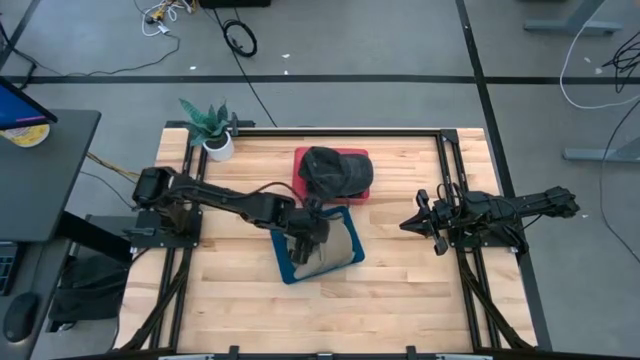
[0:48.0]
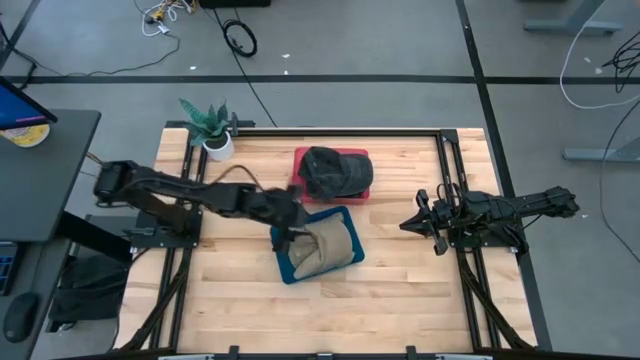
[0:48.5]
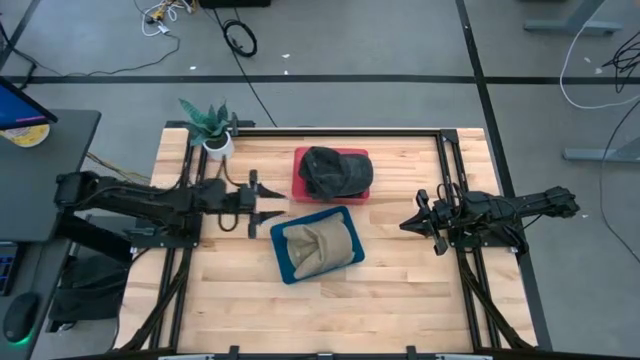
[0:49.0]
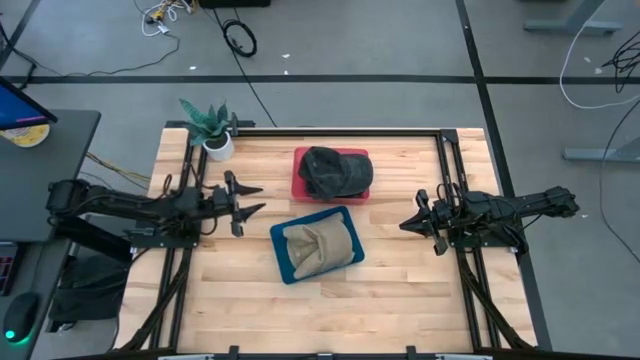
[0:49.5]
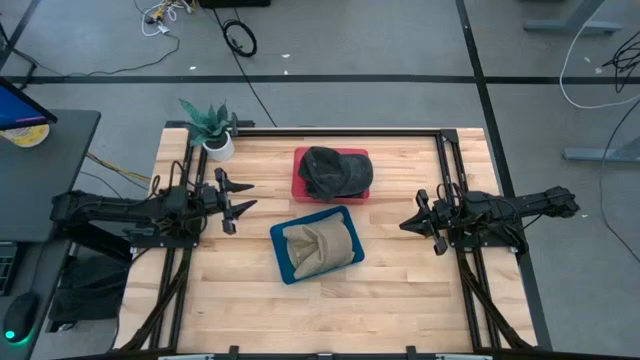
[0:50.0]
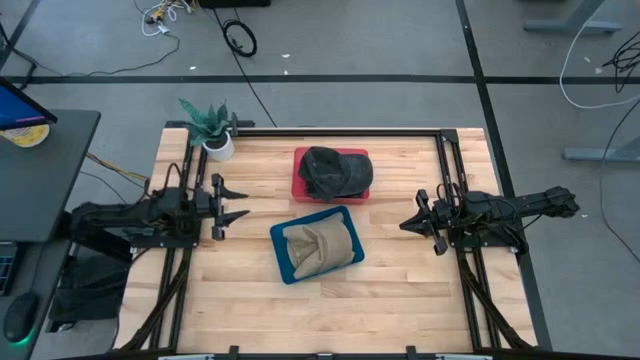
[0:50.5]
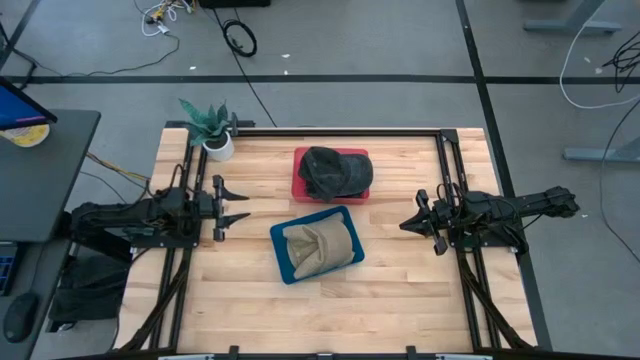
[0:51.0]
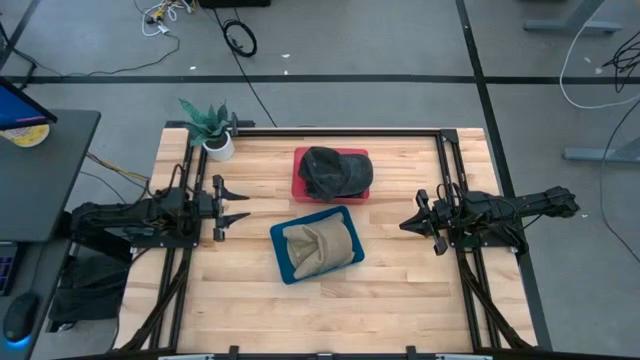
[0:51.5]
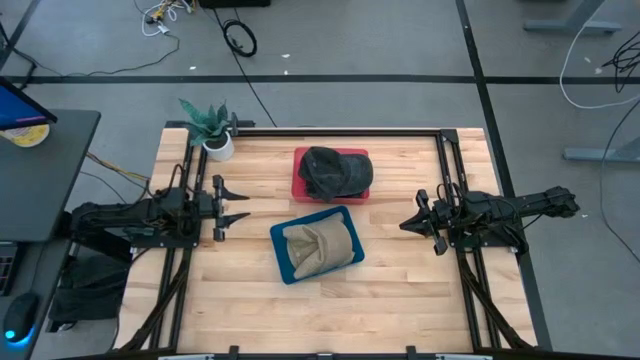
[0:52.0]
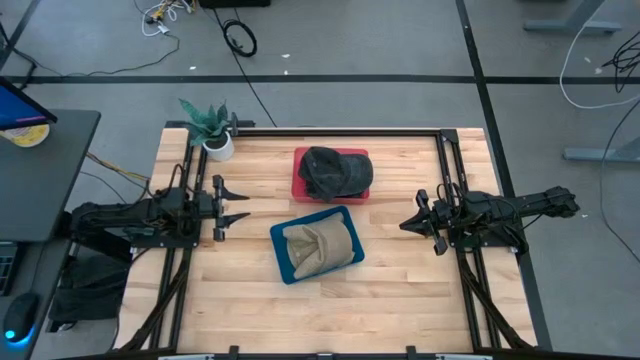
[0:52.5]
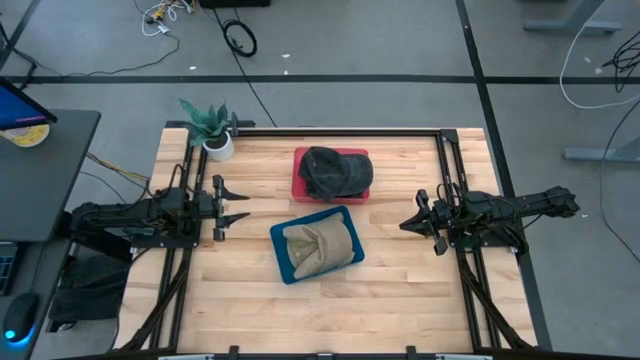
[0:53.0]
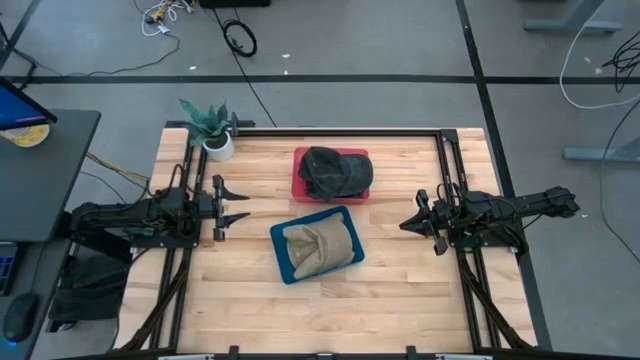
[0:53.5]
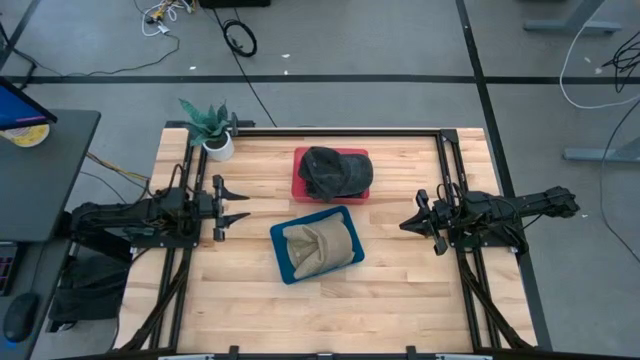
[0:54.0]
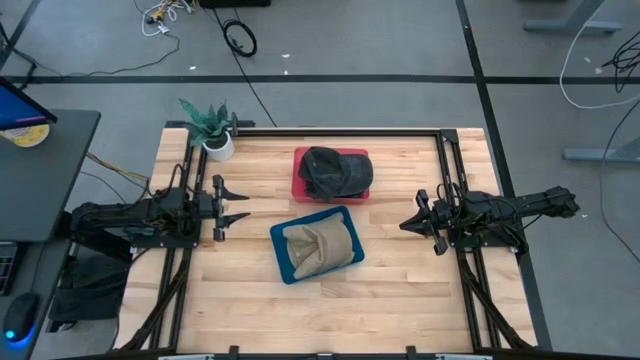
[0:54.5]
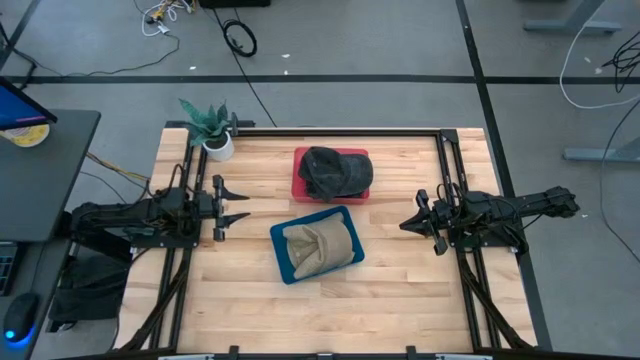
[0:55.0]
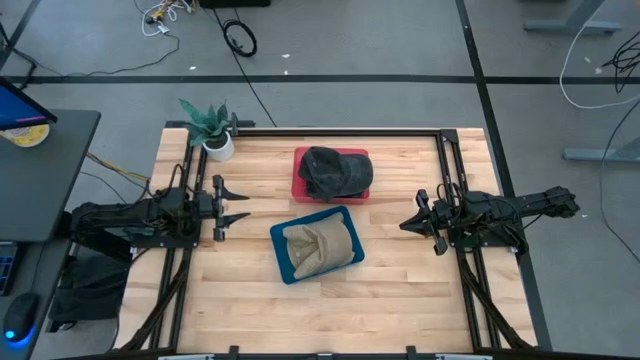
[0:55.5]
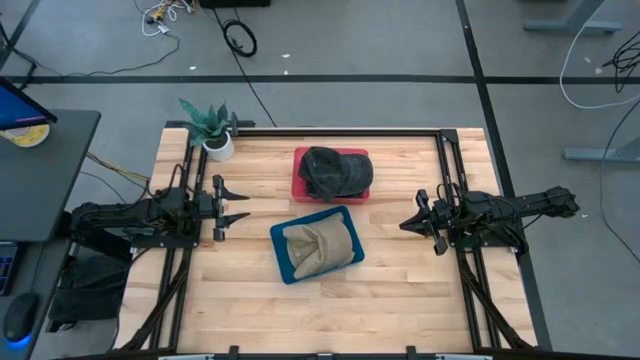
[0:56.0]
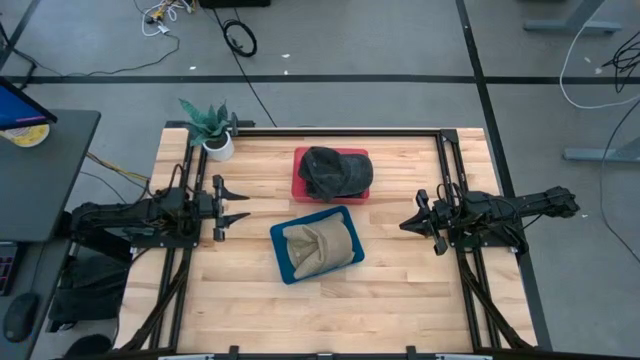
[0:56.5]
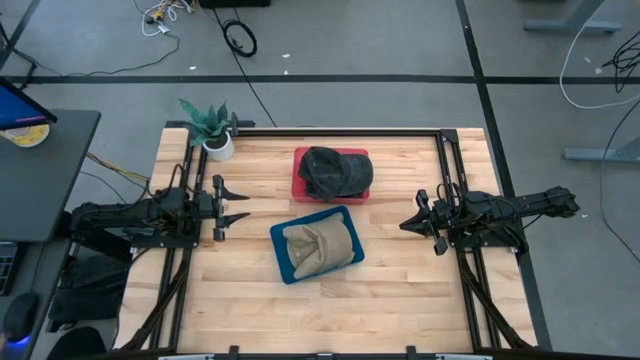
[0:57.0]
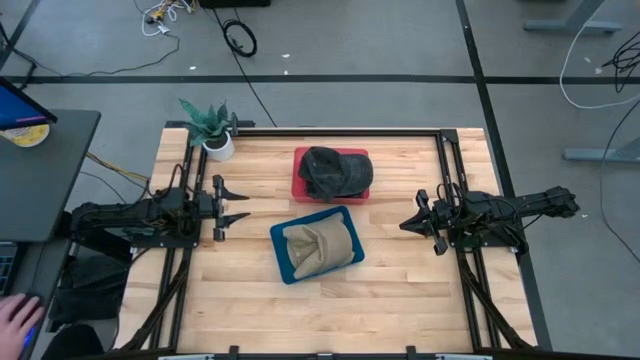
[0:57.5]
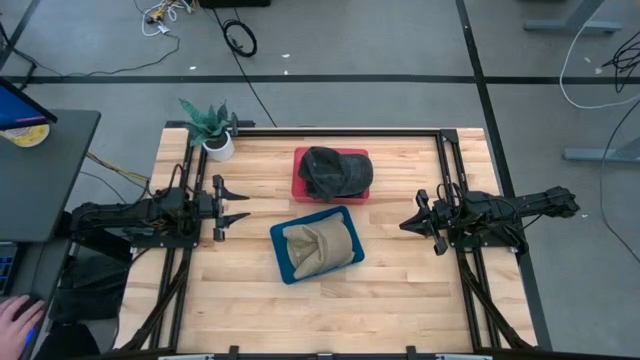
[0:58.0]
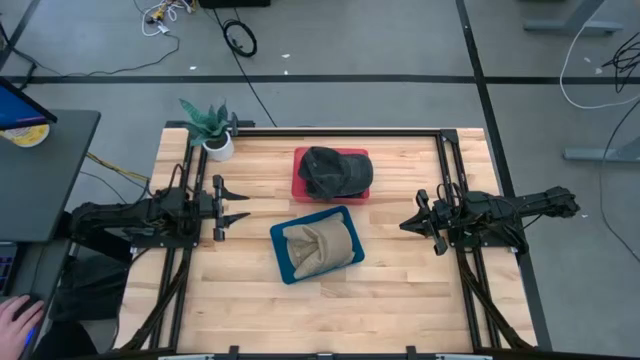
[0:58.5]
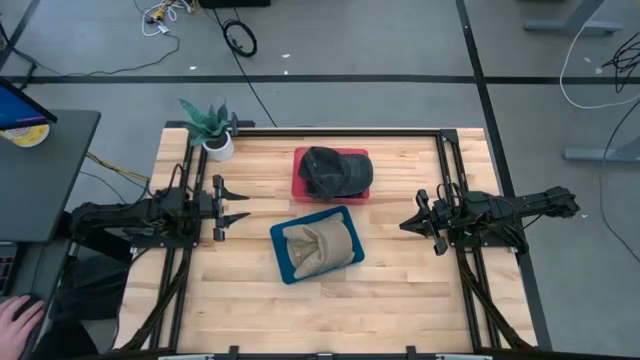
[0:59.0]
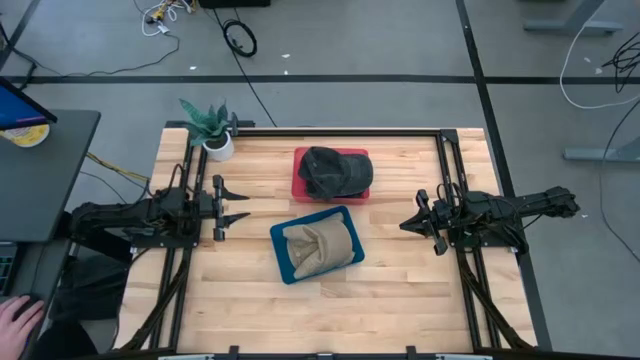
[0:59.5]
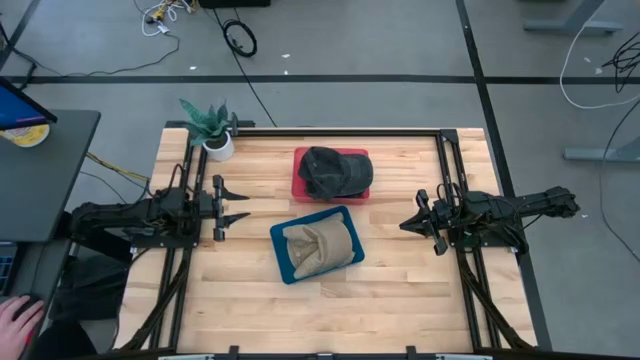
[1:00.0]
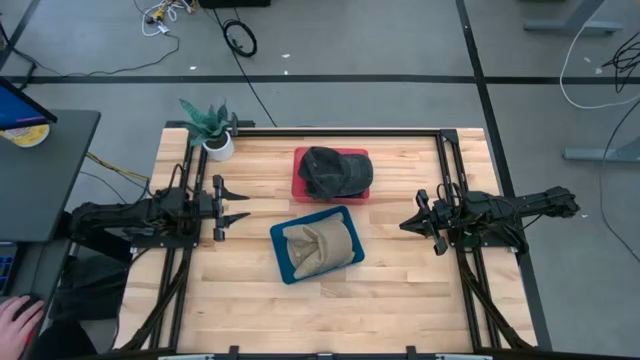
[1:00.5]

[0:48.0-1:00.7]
Task: Pick & Place hat
Return to Home Position

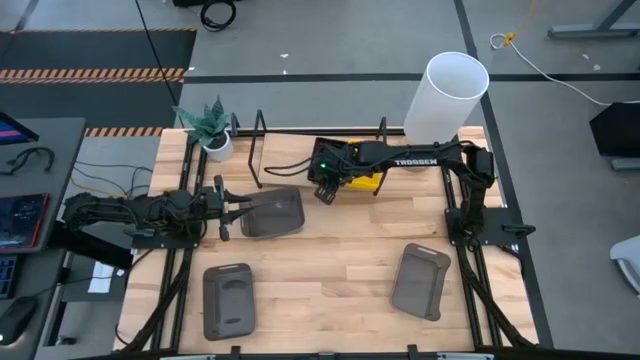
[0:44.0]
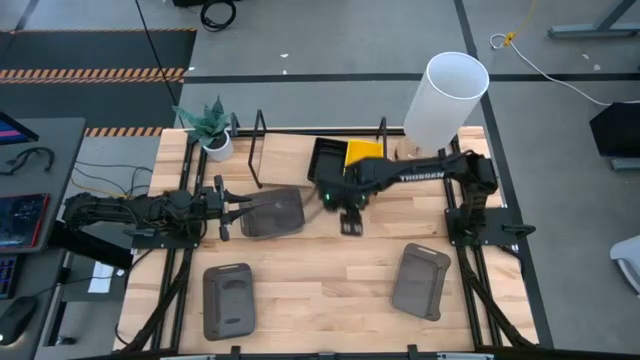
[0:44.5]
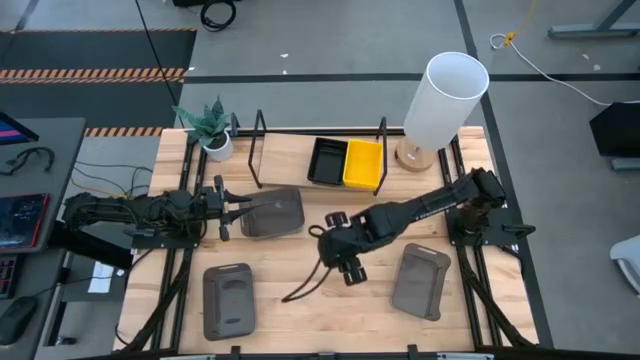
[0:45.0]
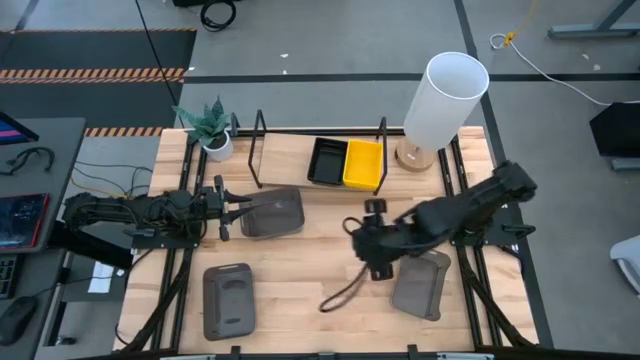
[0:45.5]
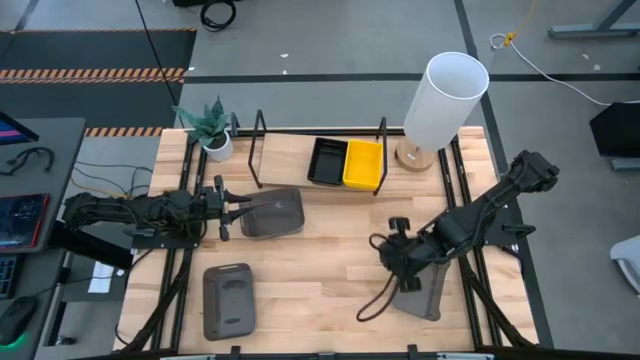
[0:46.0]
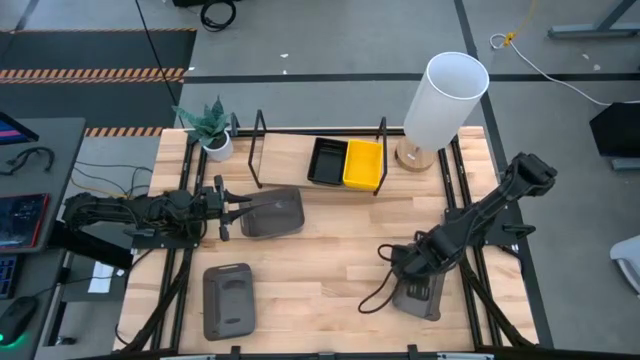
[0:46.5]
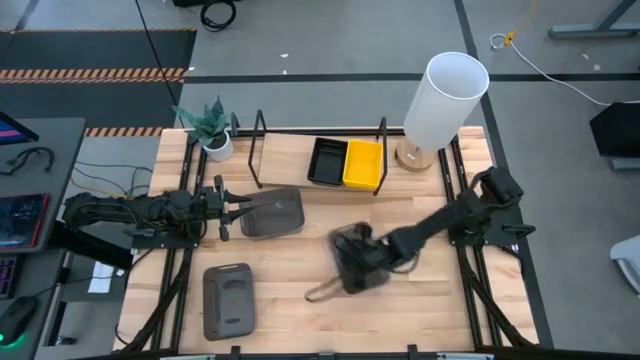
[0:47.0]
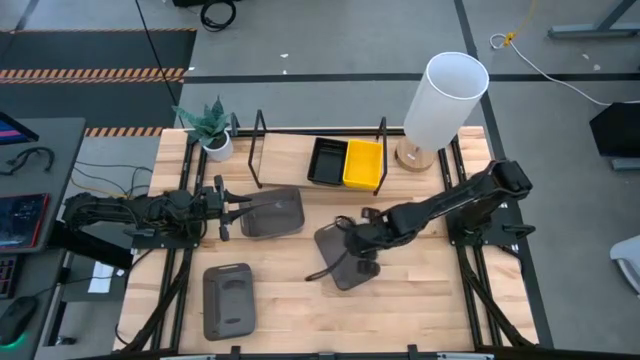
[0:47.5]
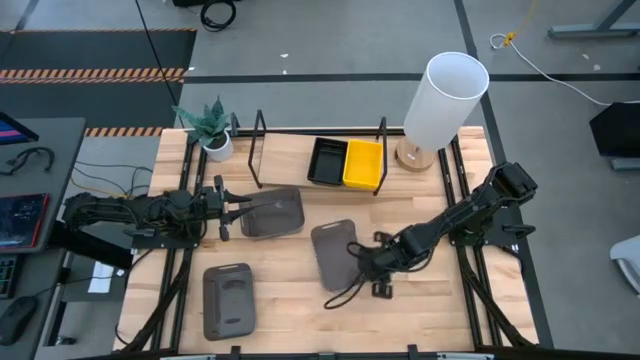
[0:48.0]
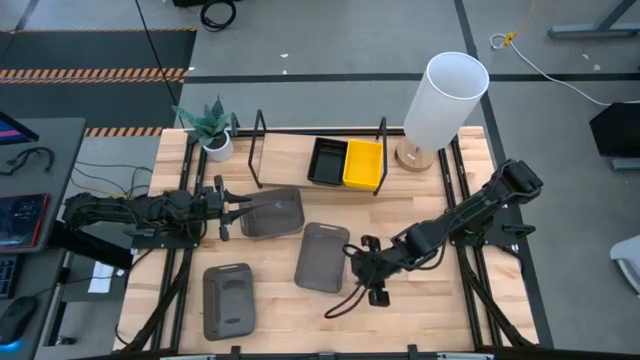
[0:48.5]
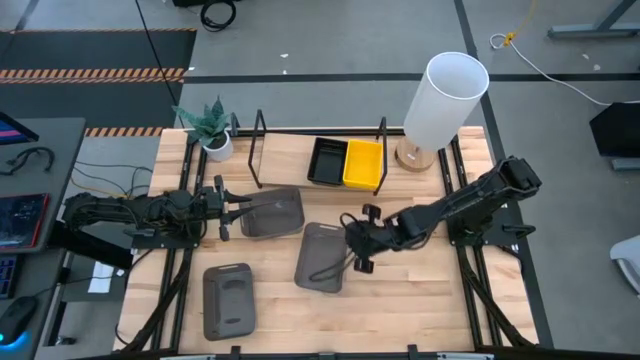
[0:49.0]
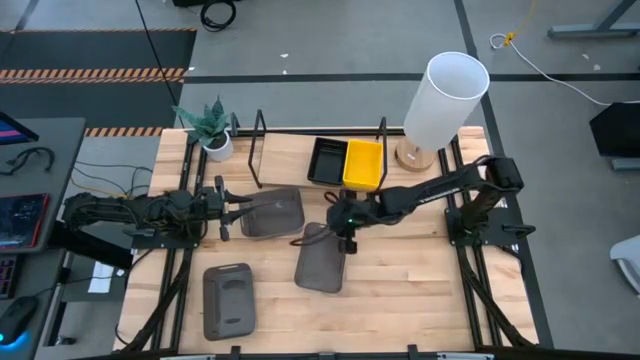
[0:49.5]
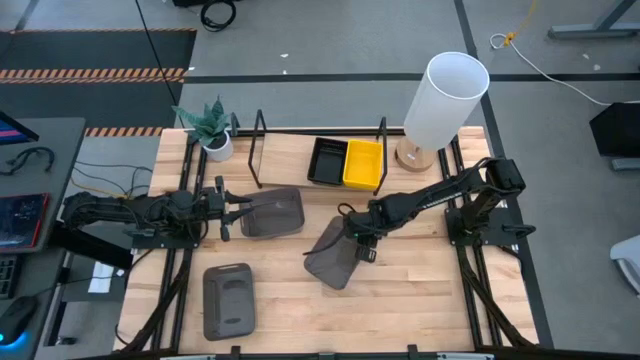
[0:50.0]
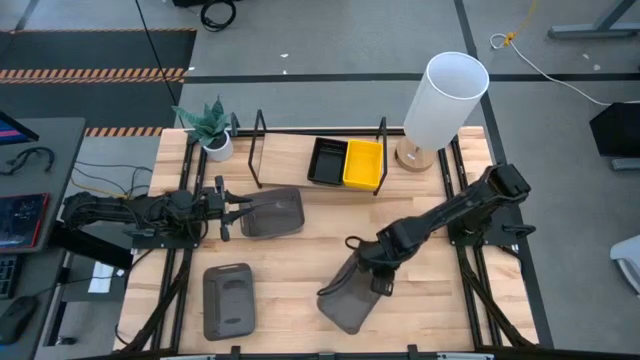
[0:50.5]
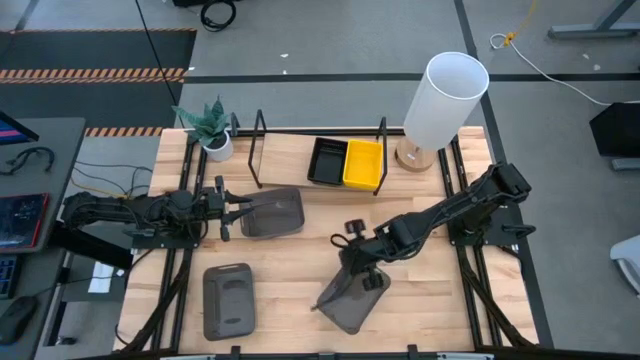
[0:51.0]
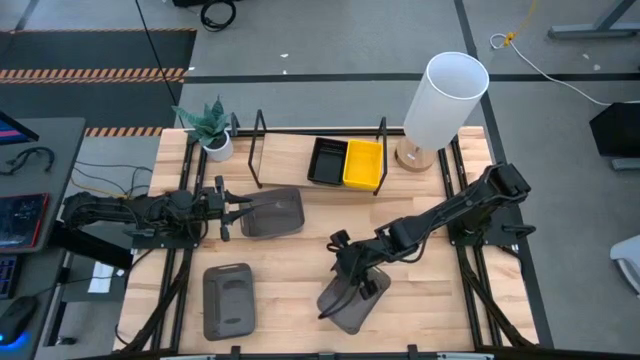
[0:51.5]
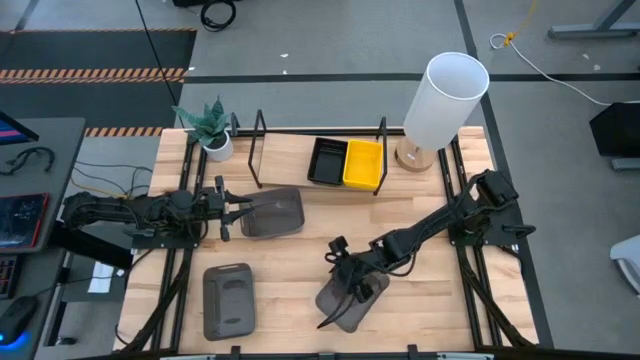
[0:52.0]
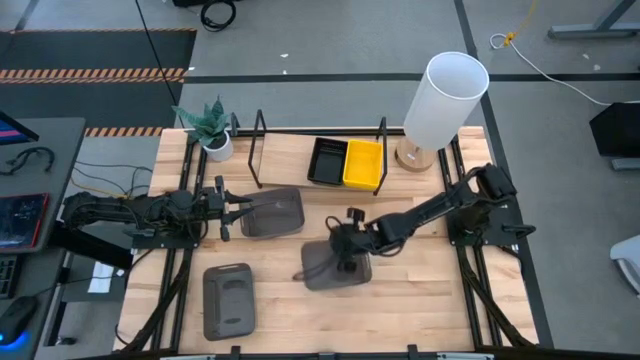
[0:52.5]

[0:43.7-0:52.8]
Task: Stack baskets on shelf by color
Adjust the middle black bin
